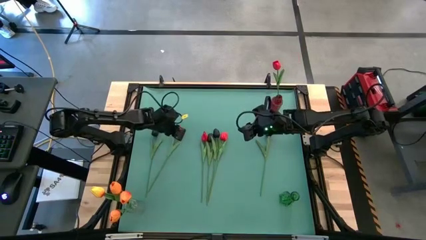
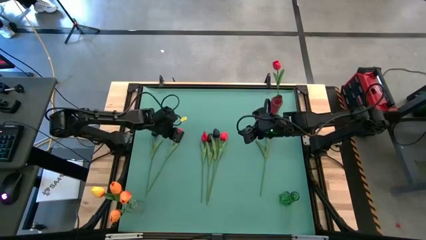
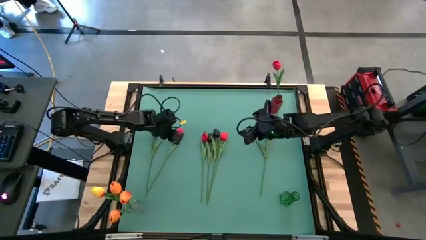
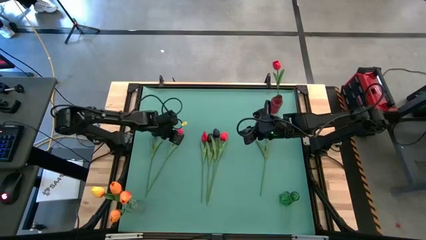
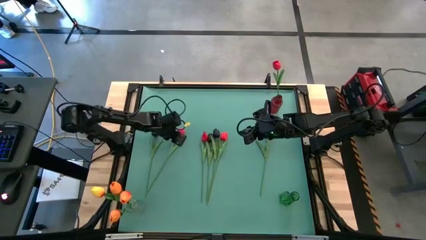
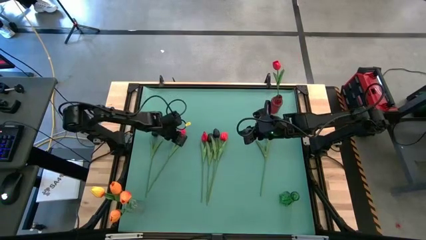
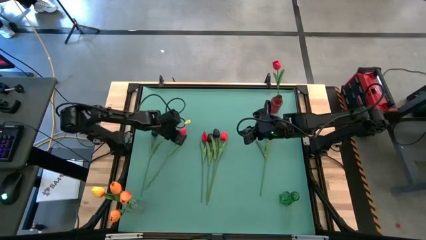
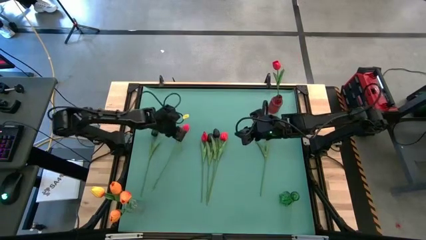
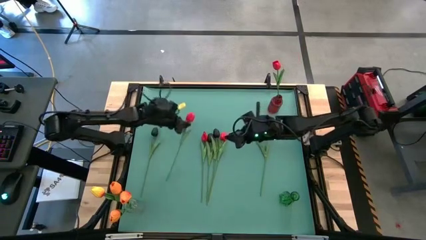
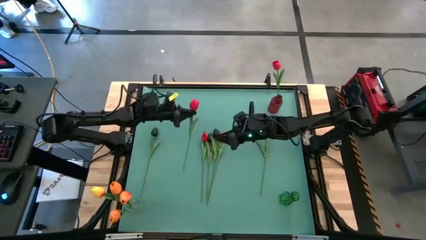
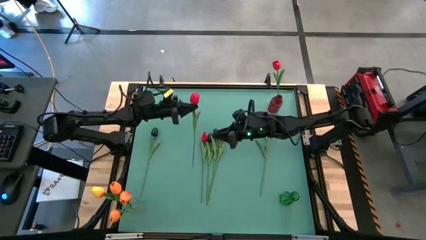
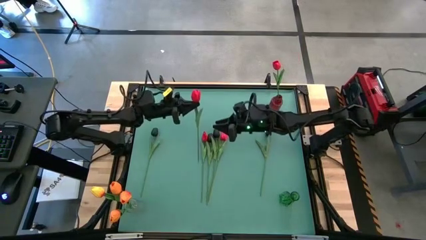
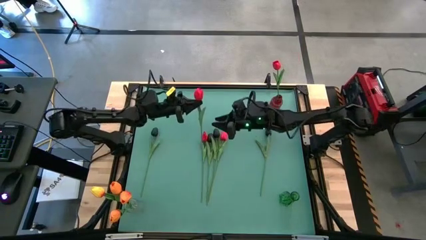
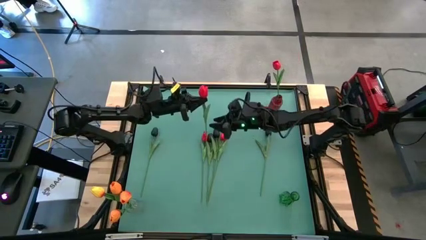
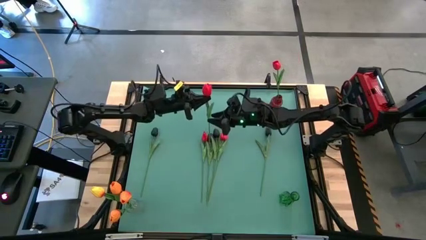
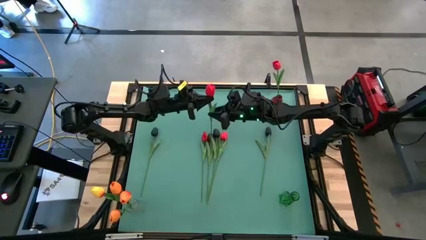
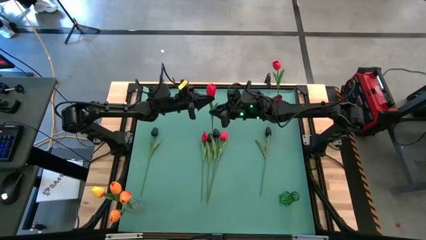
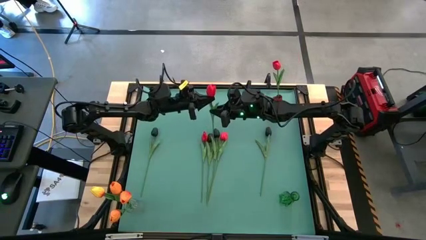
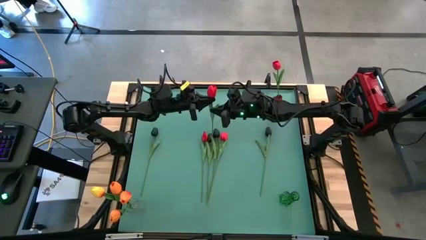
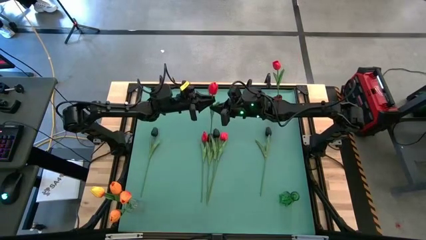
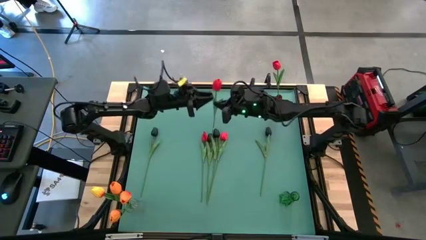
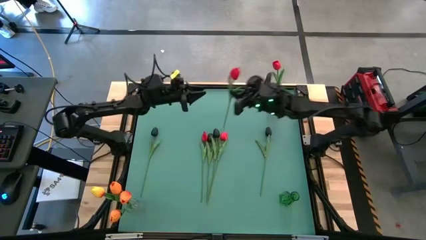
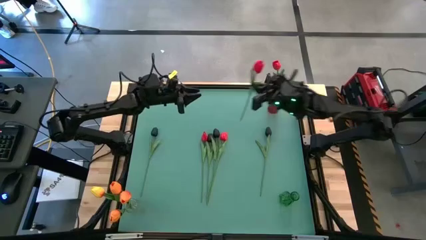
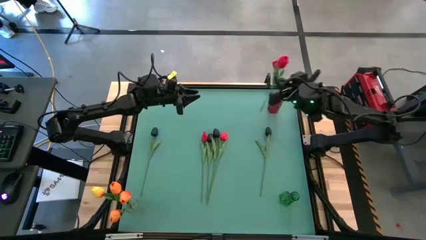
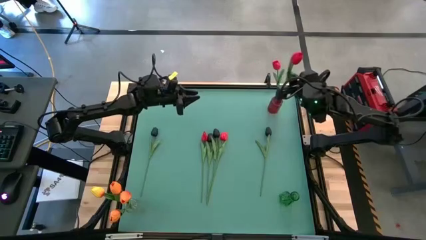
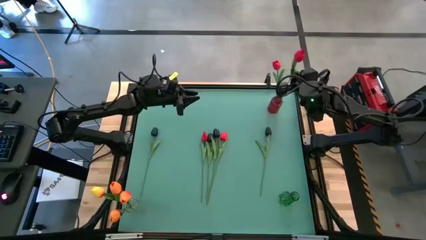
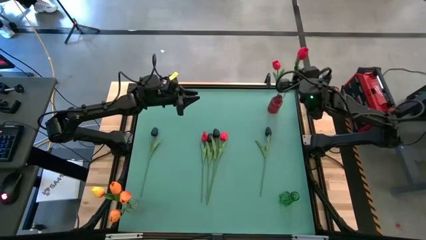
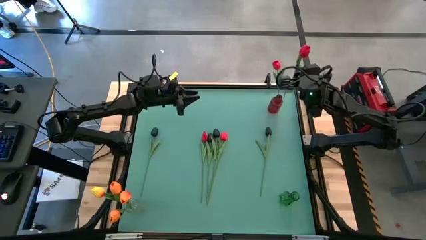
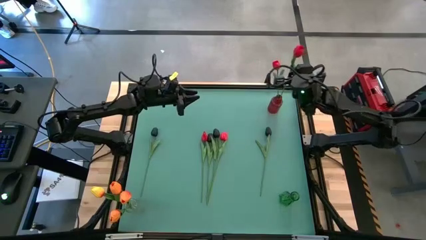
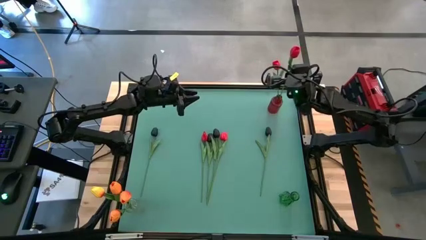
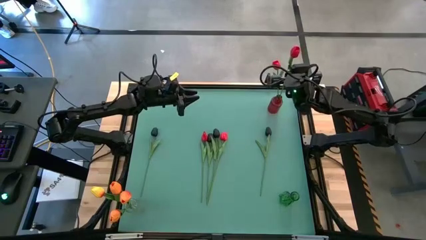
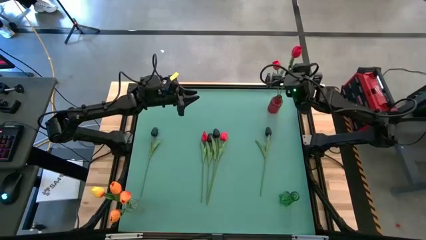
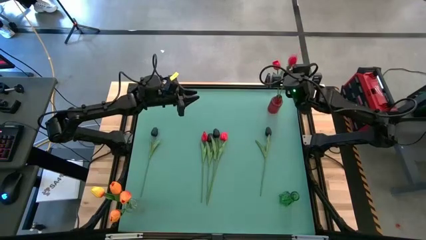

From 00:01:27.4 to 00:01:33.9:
Task: Sort flowers into vase by color
Put the red tulip into the red vase

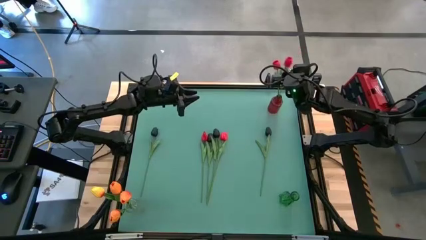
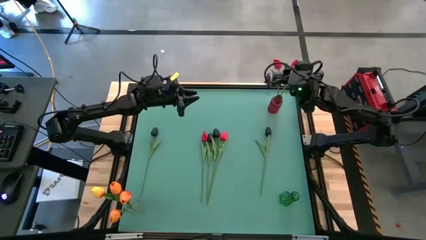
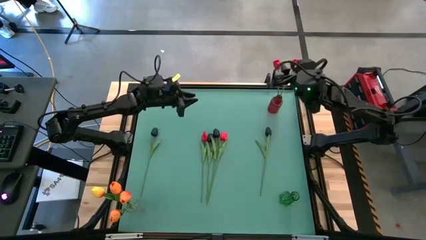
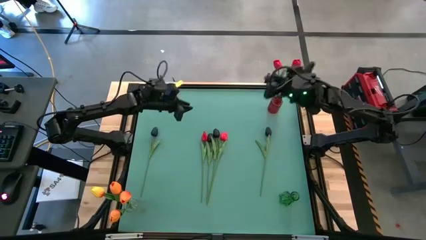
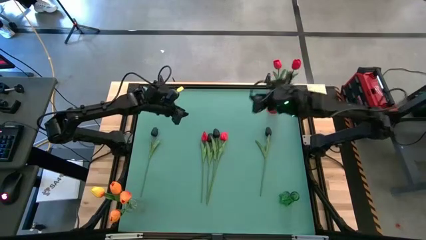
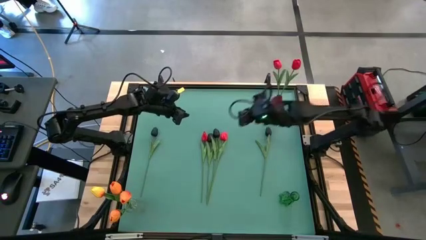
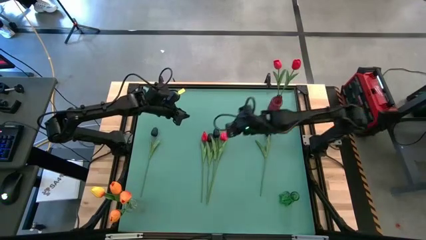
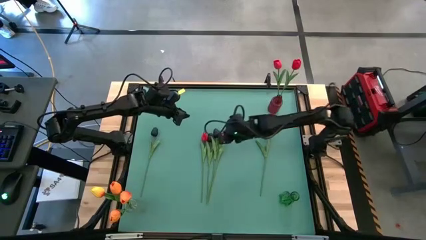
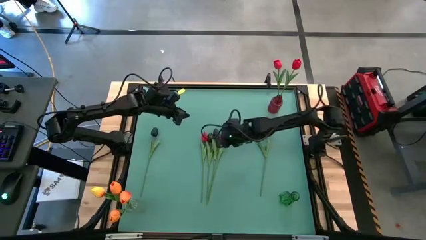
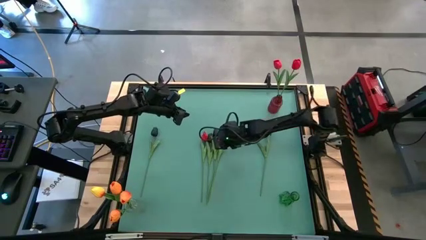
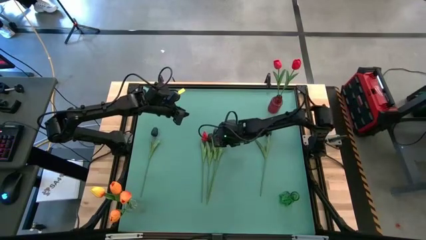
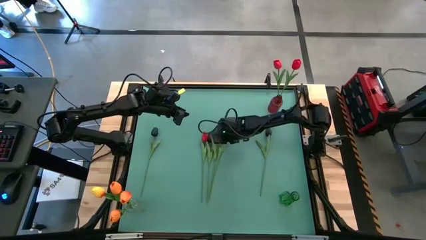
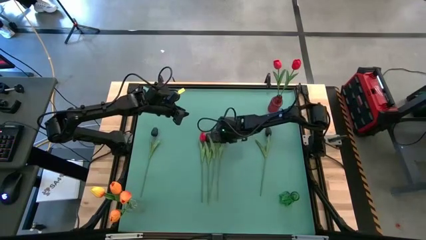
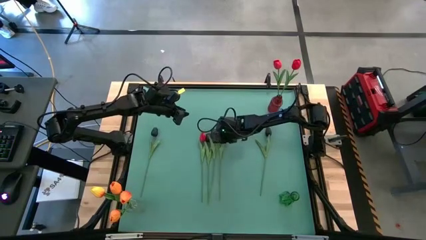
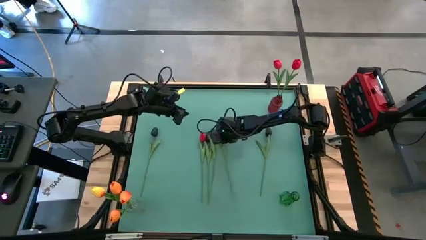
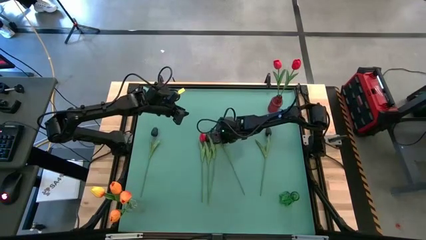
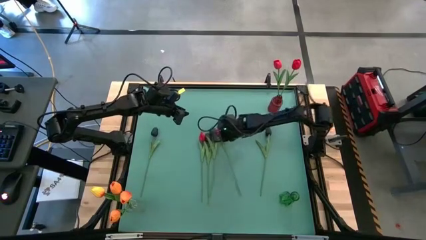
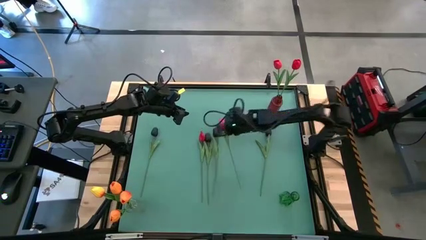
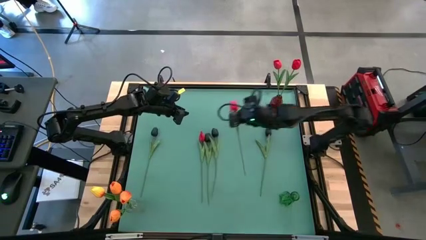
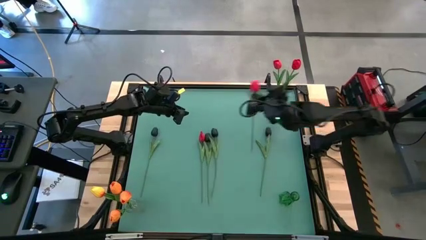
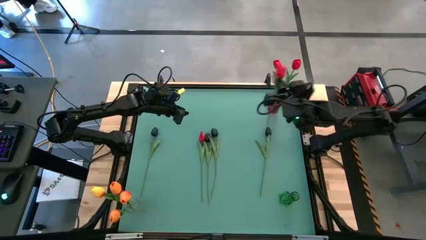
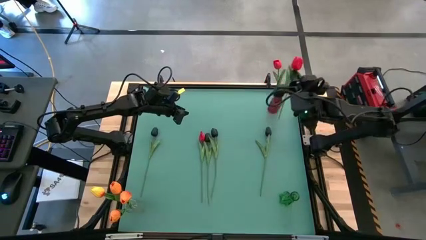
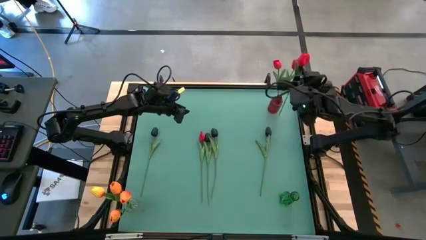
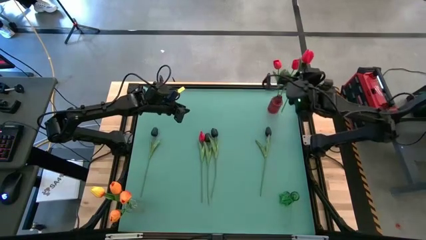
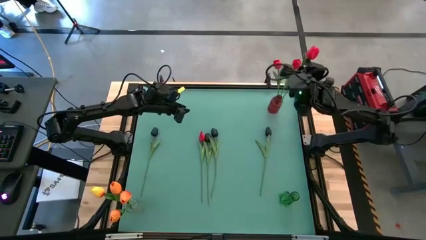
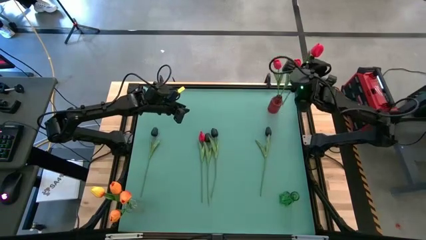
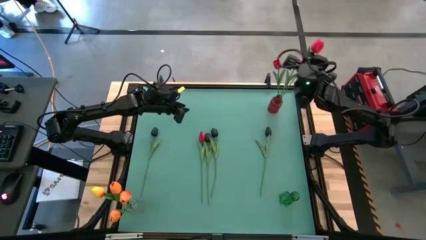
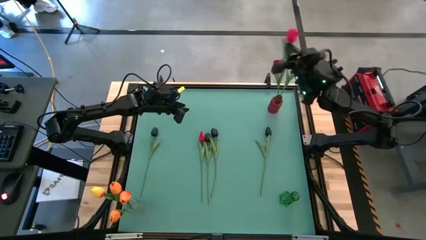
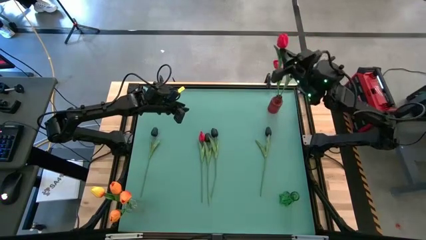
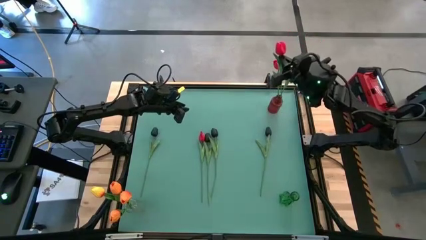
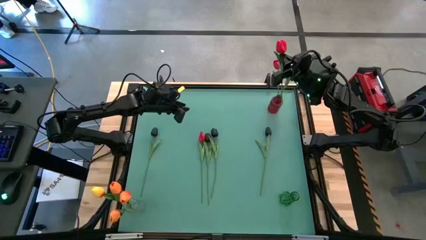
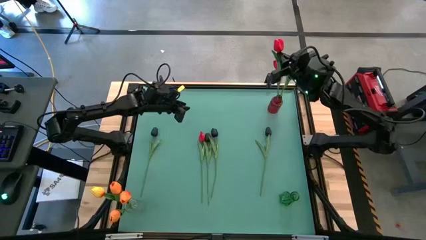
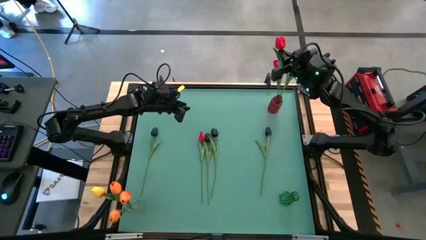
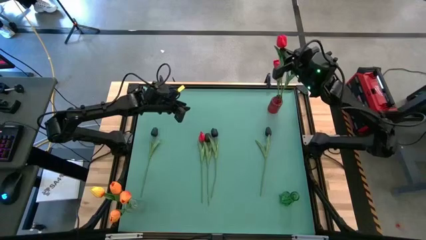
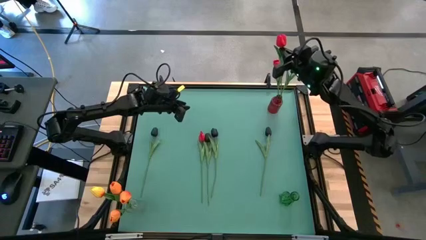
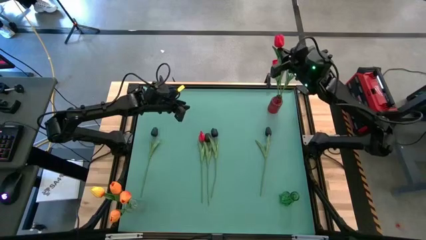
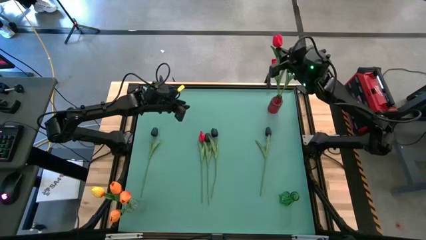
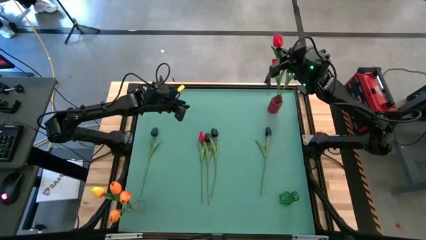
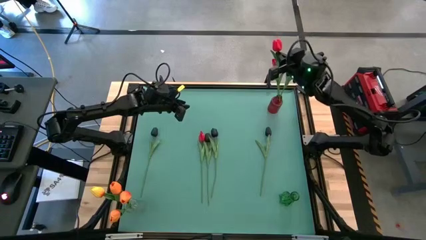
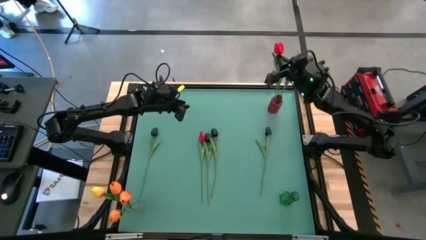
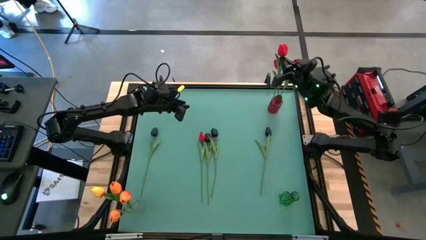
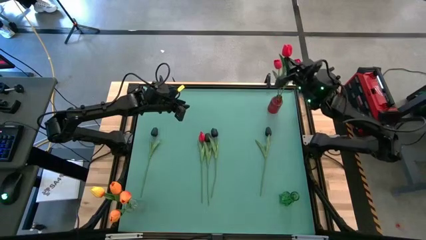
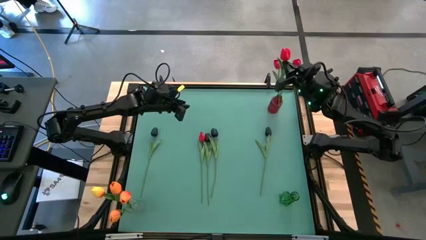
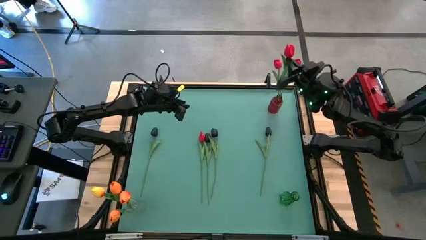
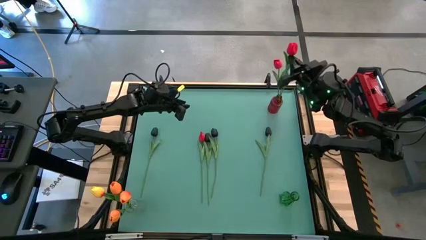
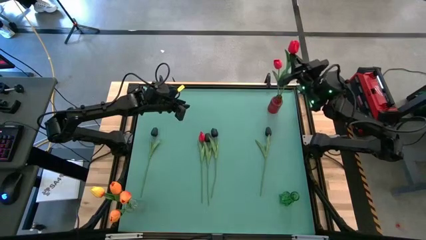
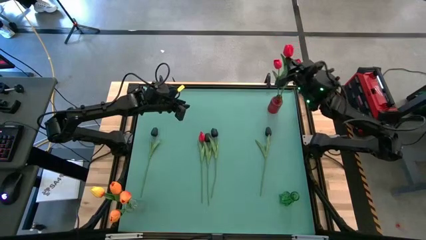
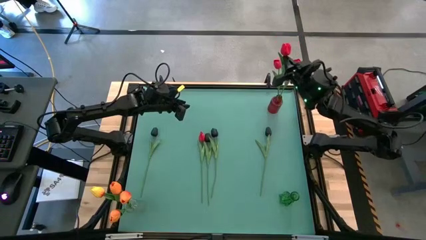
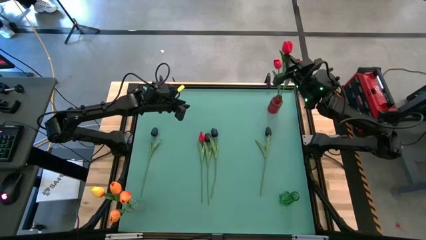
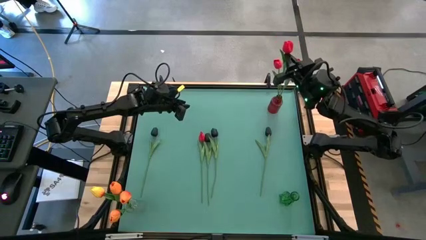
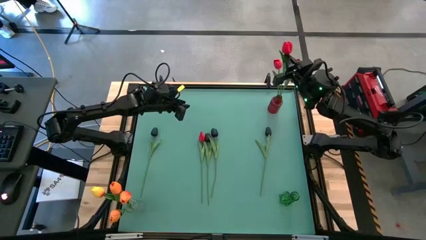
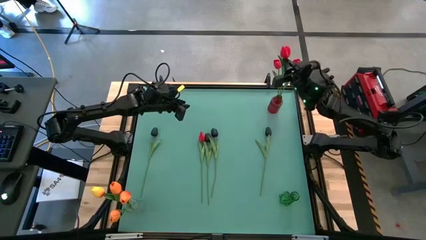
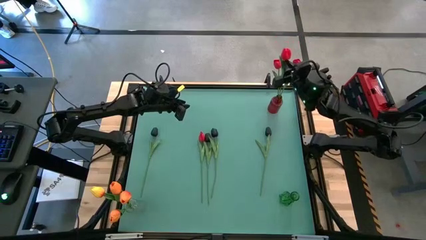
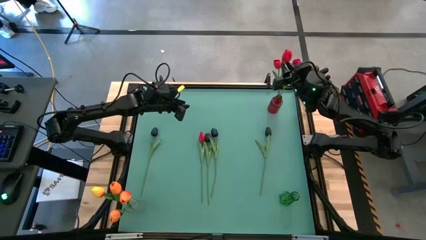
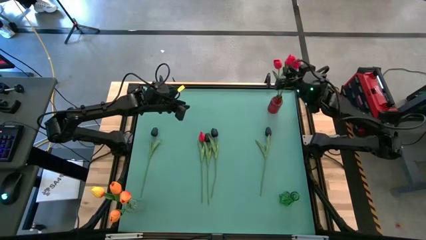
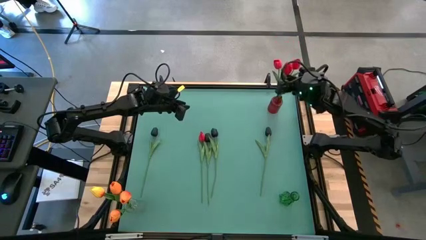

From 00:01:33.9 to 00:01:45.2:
Put the red tulip into the red vase
